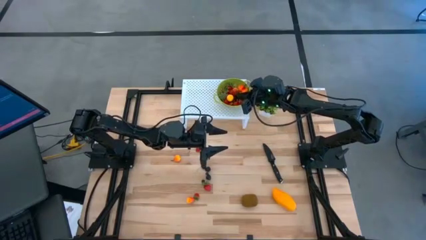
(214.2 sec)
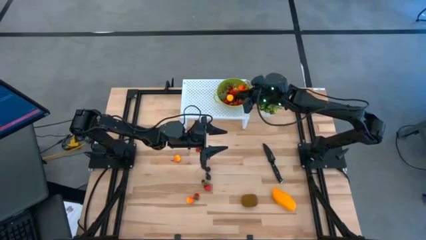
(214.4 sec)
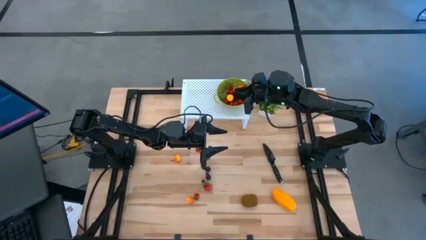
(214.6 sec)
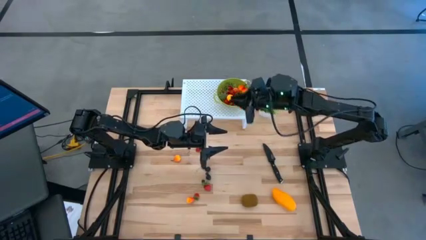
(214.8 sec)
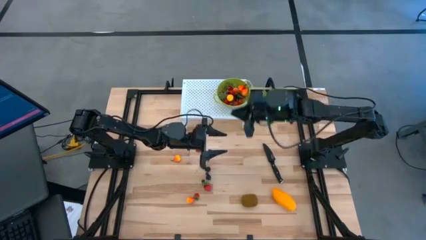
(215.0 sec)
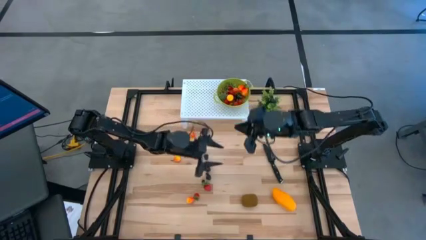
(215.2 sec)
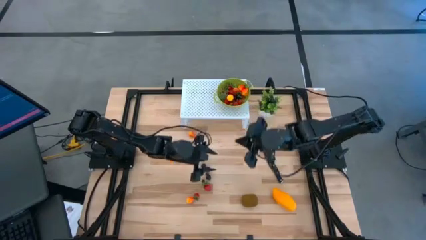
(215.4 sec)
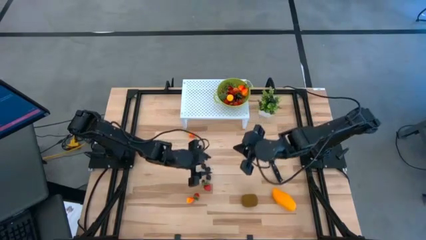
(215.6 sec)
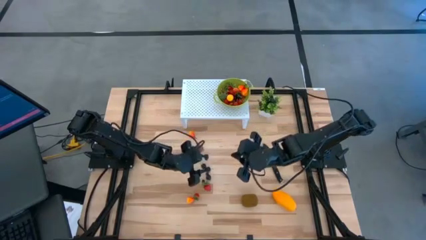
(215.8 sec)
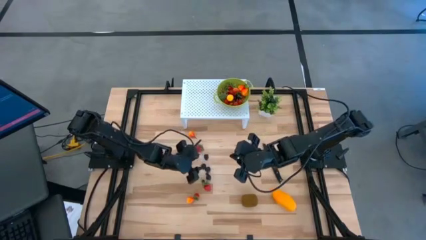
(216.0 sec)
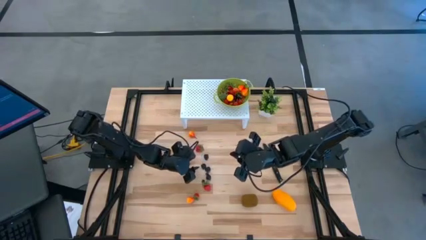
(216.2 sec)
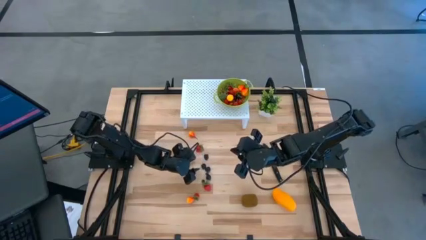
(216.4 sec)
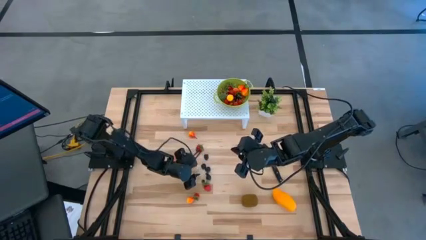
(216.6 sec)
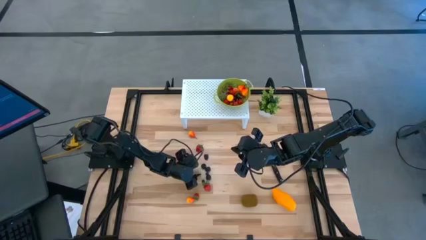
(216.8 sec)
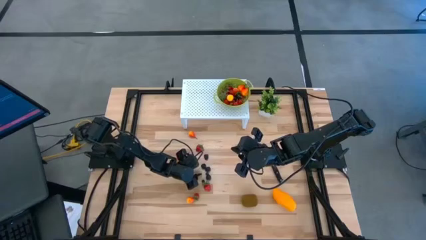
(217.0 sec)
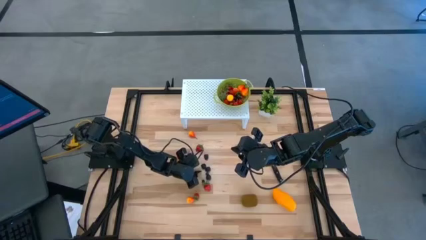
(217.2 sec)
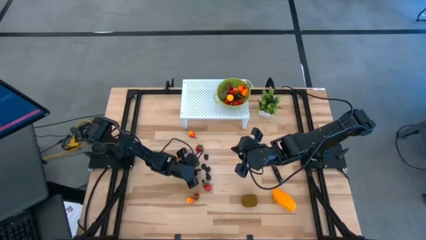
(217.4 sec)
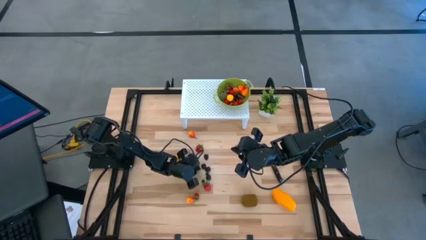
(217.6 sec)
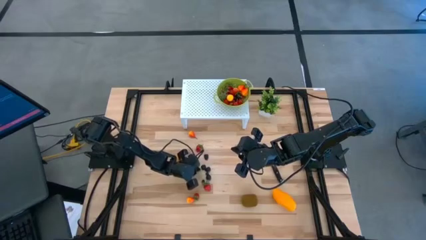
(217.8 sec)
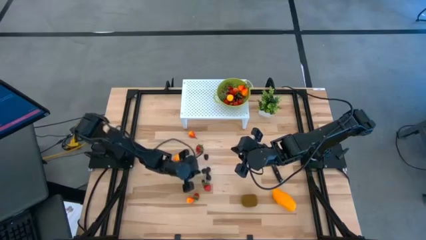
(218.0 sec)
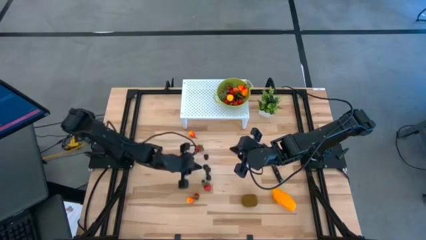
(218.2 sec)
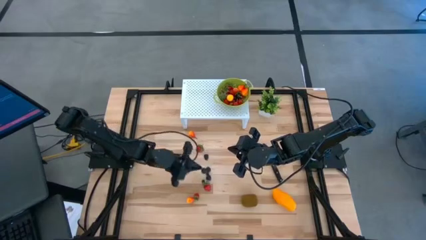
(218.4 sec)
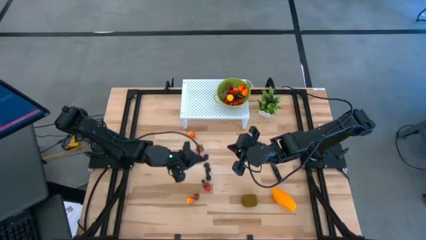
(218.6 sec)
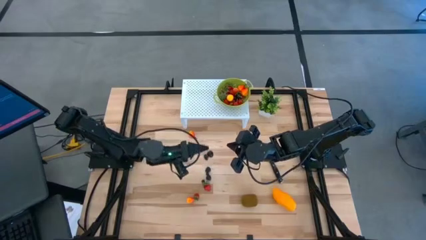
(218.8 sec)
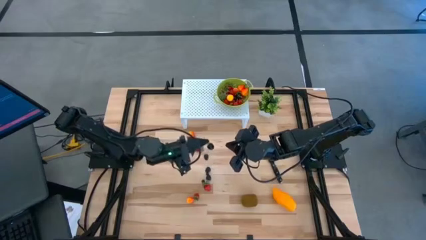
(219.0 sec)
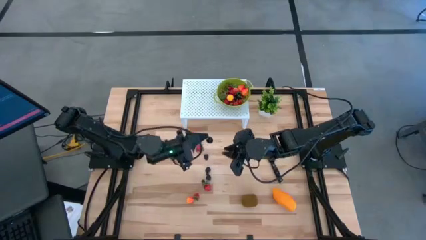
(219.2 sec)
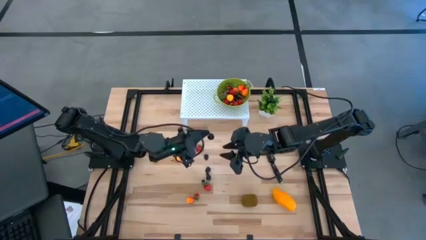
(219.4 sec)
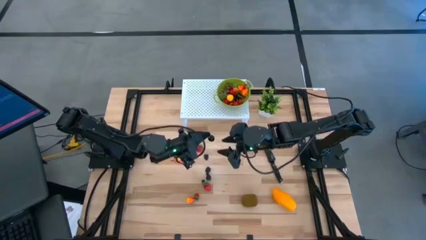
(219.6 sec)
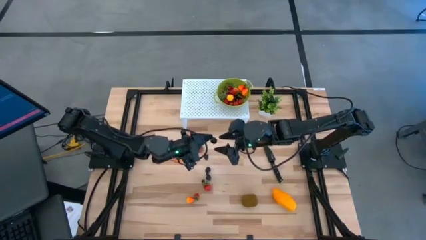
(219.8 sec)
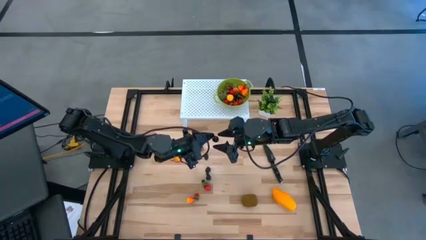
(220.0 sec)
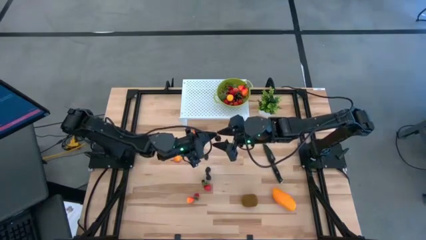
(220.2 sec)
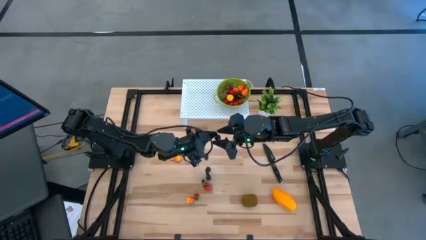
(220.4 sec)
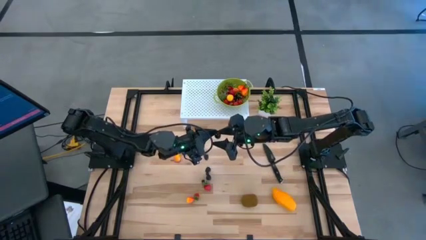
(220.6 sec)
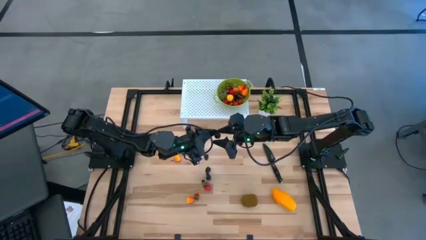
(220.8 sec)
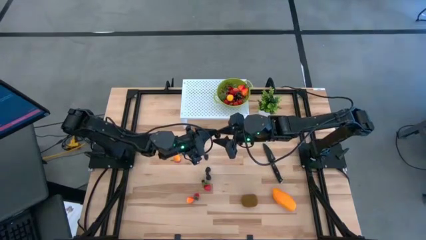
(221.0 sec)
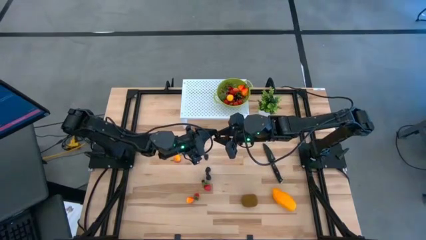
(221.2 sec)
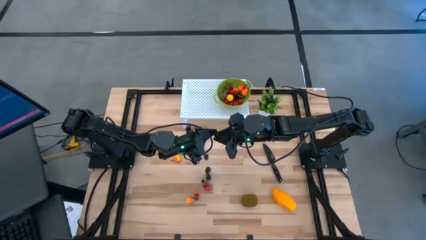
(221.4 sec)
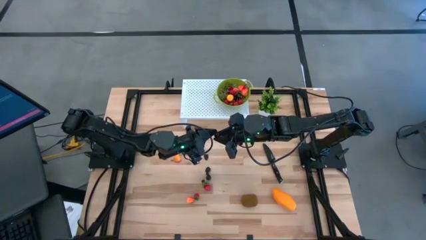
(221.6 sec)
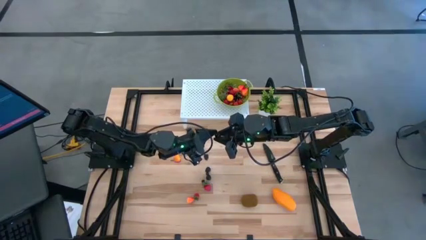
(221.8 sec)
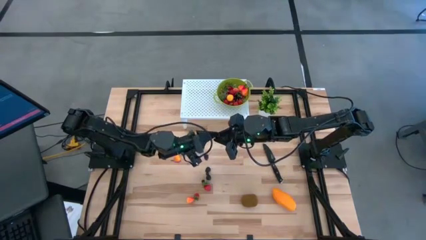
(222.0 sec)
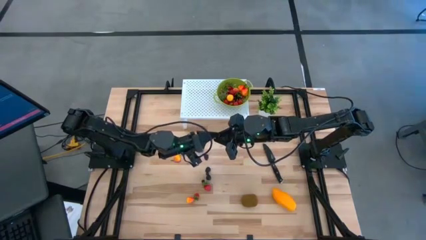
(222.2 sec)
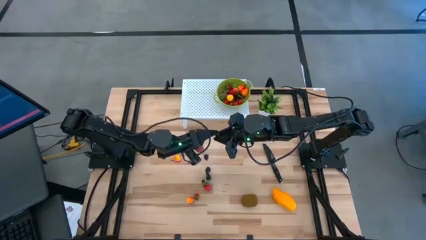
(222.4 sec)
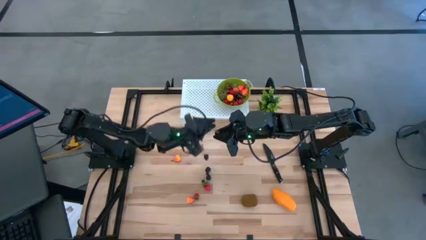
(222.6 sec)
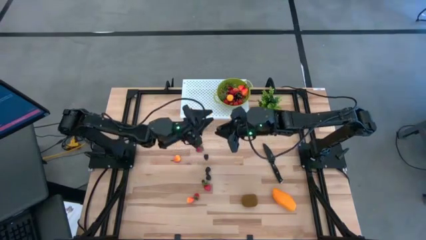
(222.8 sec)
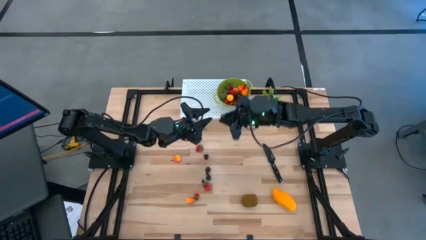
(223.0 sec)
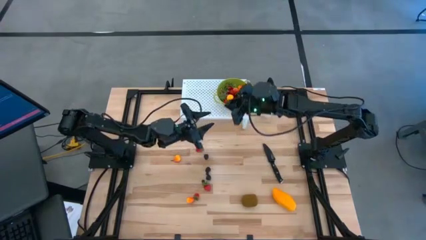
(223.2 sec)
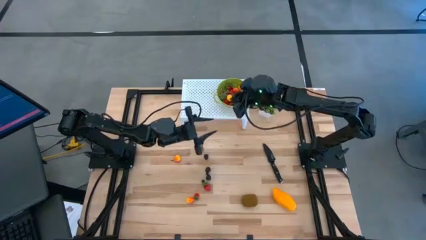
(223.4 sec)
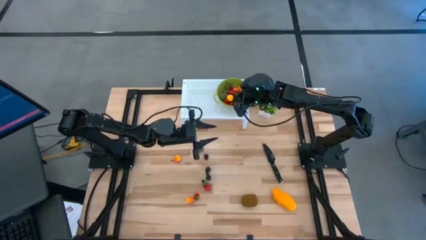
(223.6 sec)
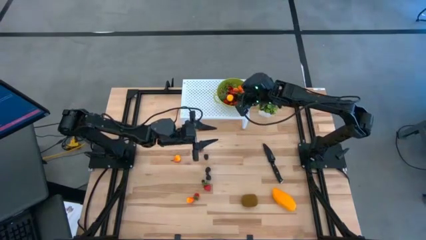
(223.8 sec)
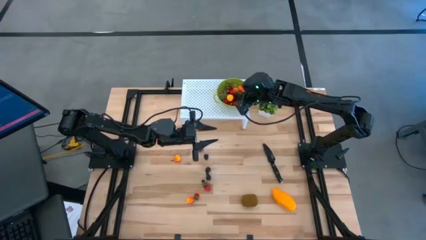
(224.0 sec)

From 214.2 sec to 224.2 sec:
Task: Pick & Place Fruit
Put the black cherry into the green strainer bowl
